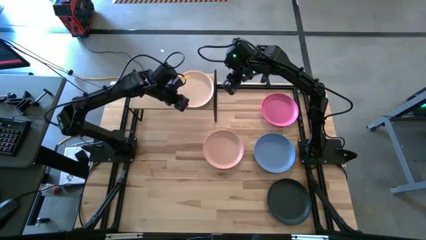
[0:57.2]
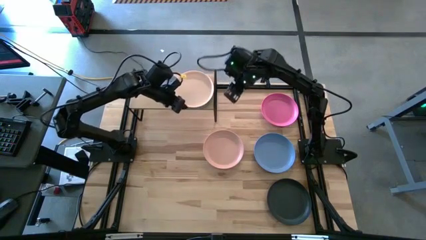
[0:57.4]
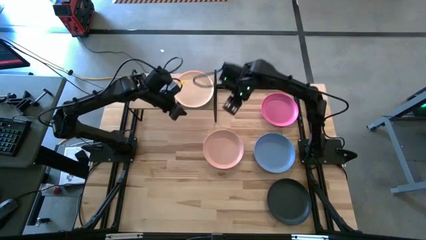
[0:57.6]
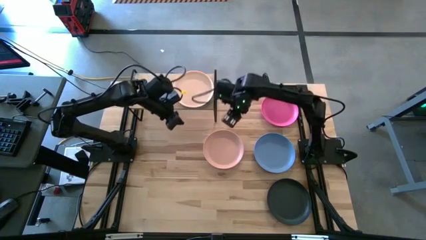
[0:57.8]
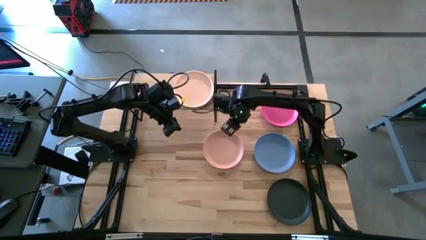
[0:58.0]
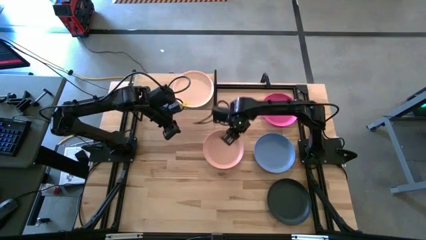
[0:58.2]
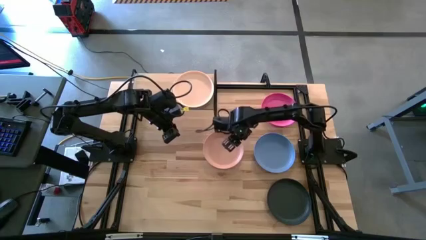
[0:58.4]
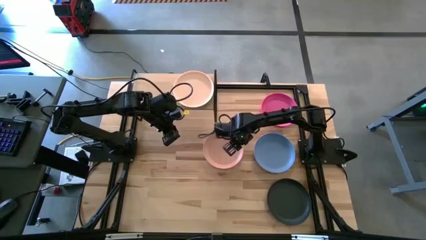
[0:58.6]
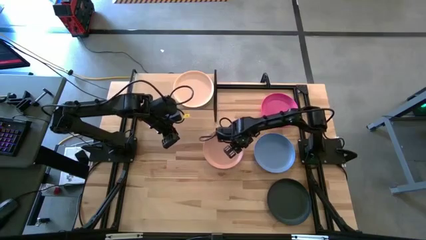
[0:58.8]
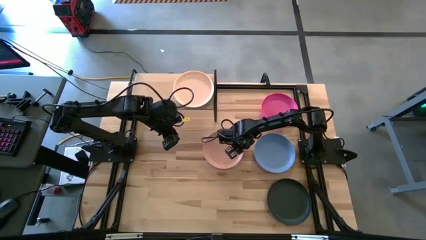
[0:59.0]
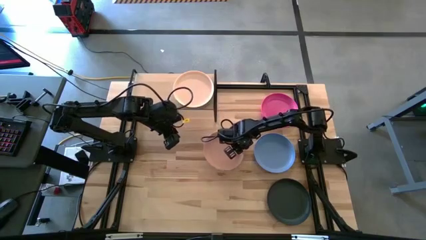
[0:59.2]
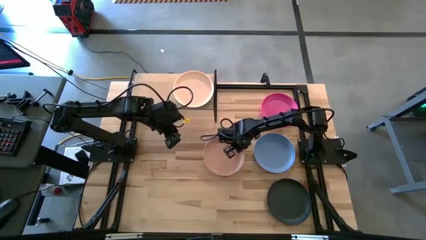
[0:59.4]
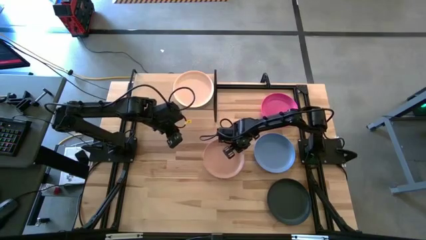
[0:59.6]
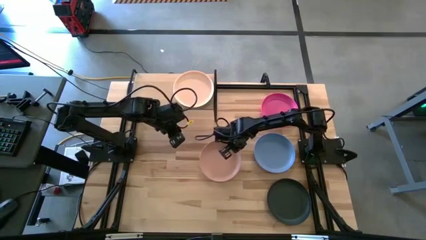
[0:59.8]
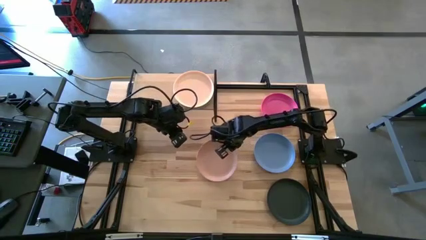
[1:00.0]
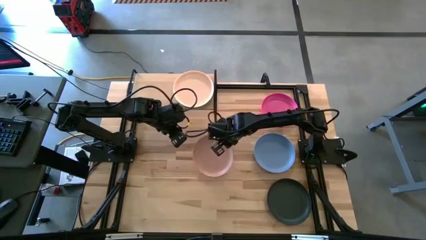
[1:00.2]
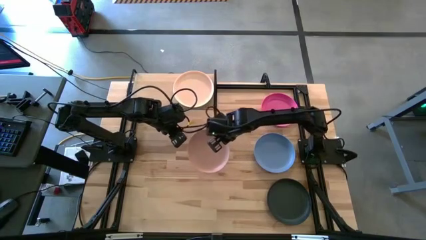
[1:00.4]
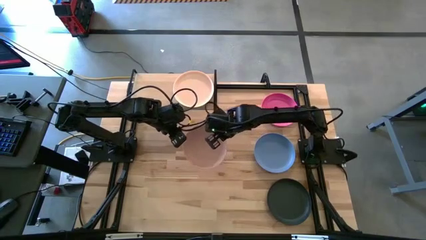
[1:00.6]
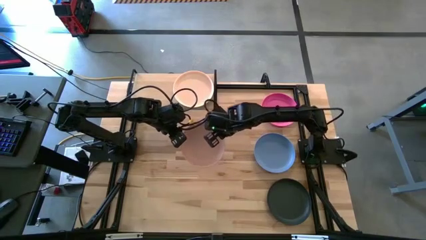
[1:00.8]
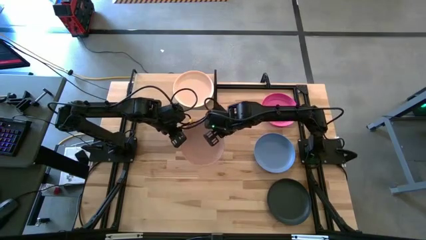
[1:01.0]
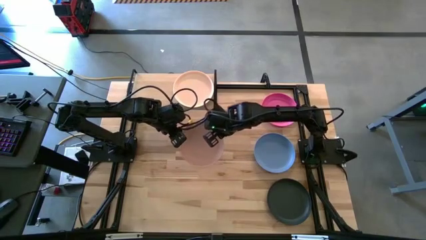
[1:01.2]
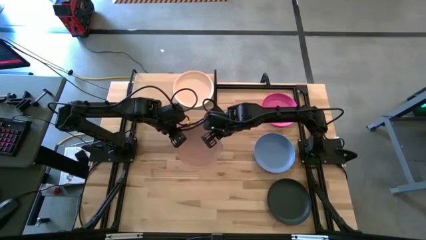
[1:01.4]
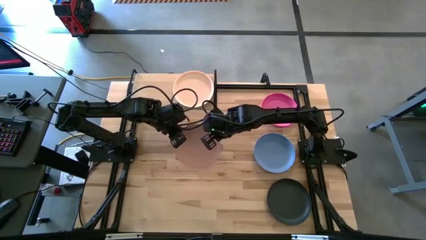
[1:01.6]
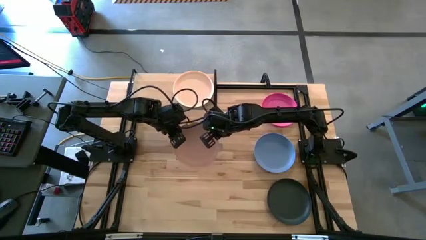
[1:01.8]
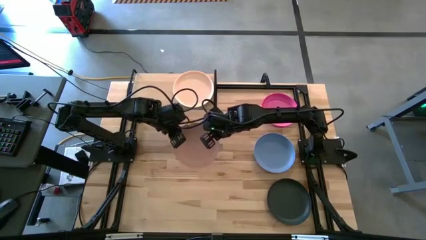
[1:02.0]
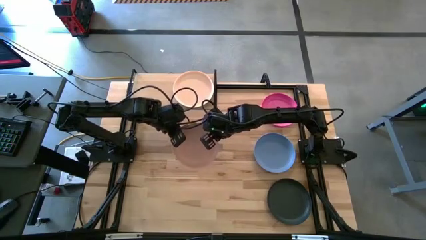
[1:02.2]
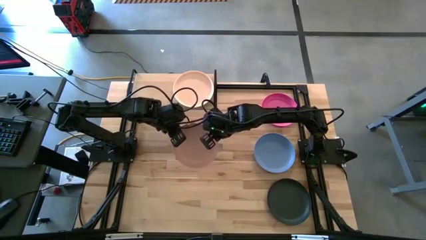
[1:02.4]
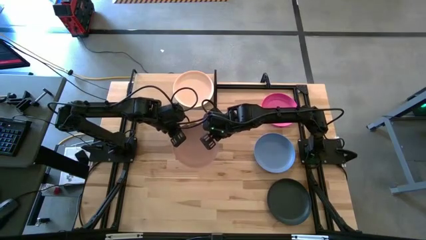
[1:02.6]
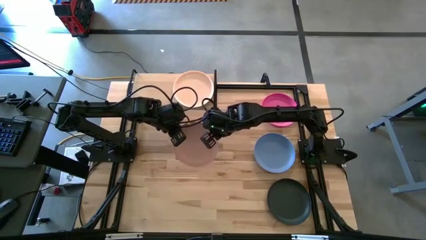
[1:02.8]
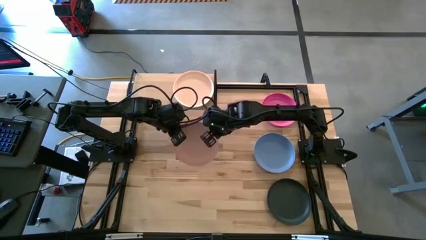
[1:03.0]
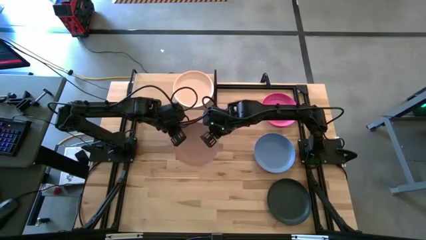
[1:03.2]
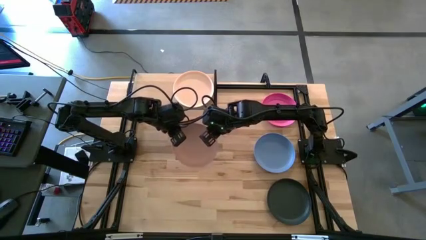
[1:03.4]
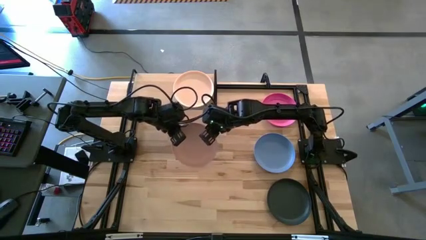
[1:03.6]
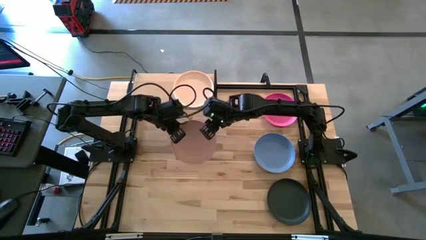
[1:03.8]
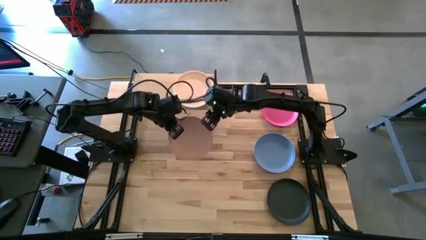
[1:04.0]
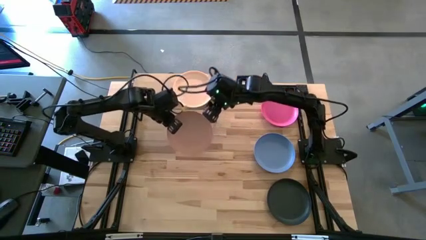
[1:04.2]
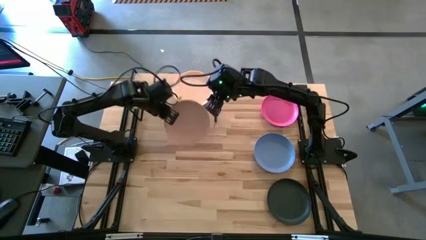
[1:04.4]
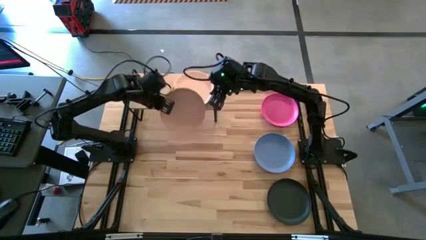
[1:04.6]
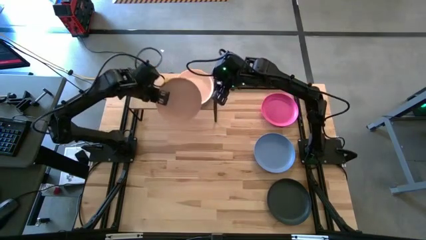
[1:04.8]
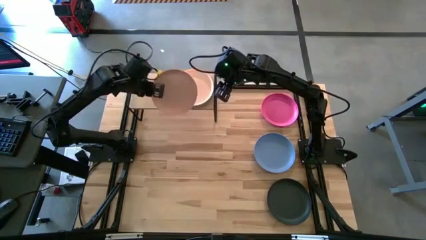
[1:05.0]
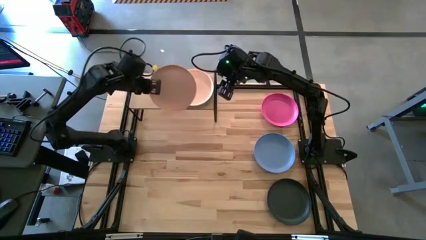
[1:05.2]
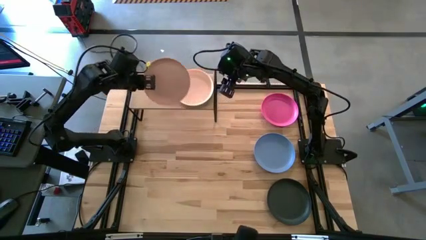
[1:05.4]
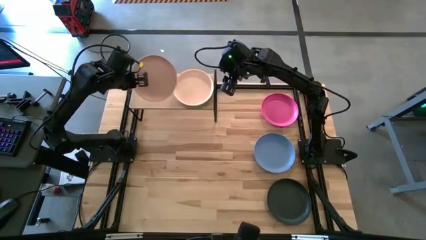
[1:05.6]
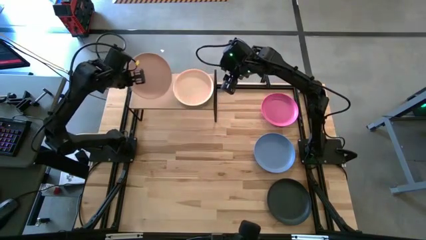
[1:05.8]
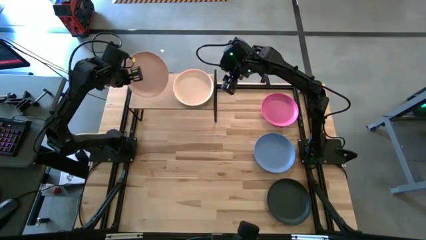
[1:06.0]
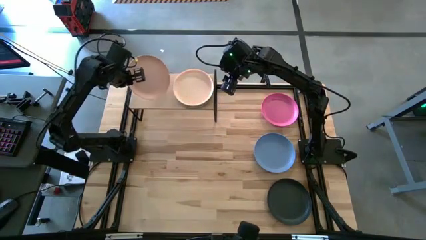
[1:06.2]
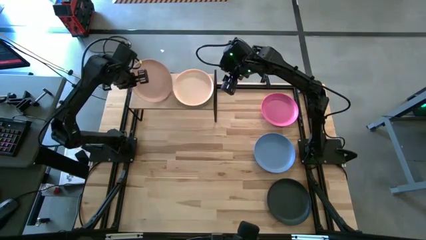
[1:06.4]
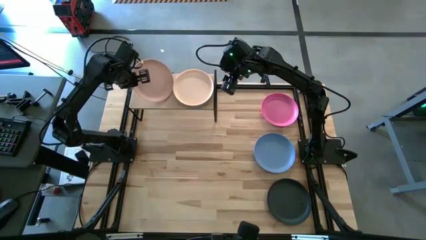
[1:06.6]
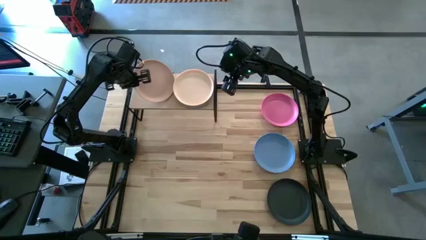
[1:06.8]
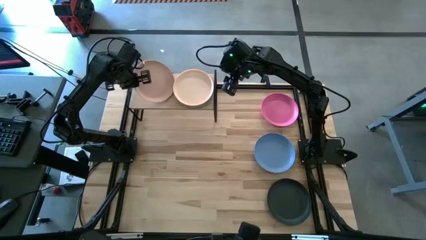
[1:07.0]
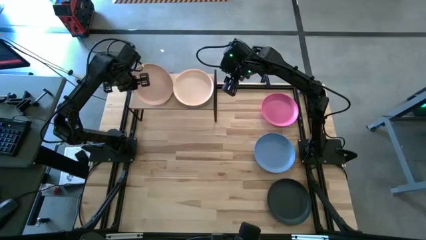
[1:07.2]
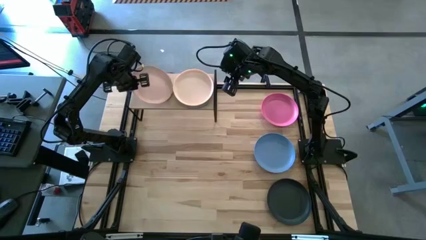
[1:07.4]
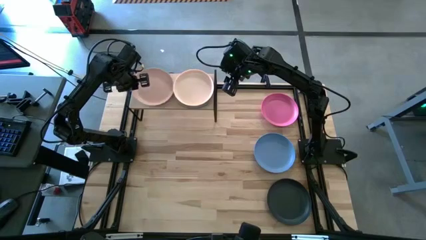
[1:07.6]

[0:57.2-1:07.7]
Task: Place and stack plates onto a shelf
Put the light pink plate on the shelf
